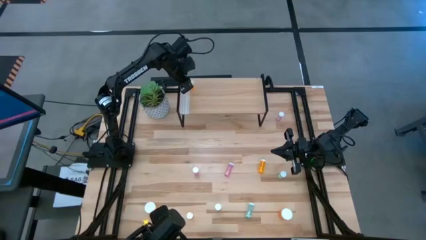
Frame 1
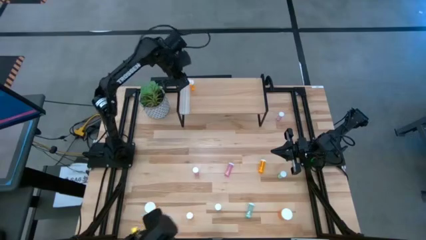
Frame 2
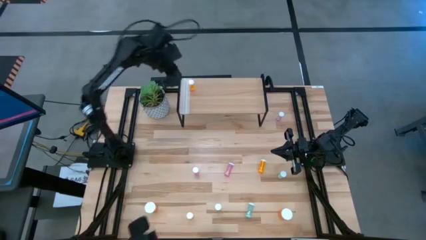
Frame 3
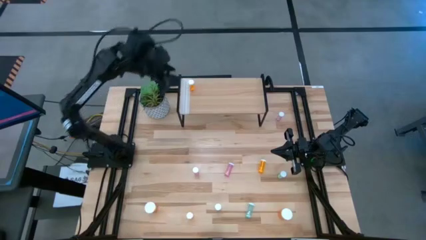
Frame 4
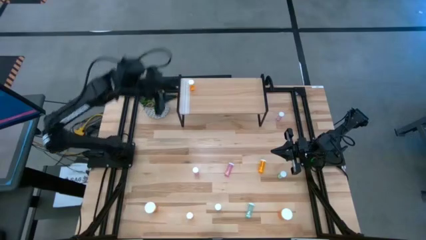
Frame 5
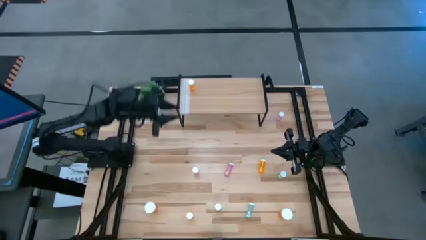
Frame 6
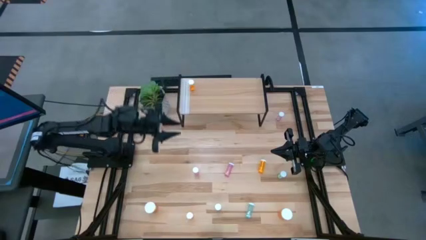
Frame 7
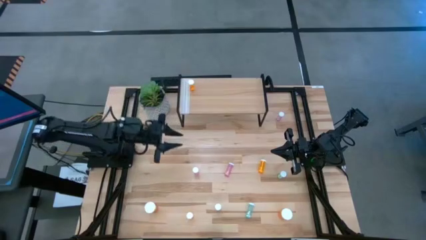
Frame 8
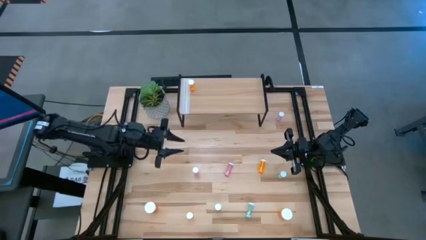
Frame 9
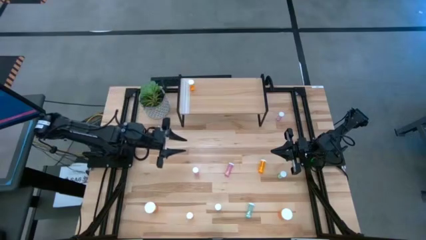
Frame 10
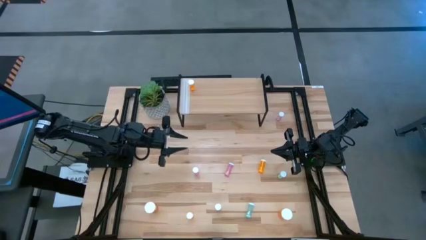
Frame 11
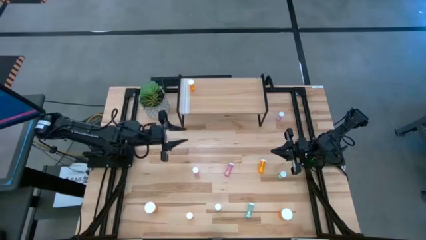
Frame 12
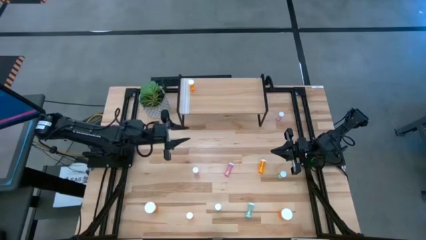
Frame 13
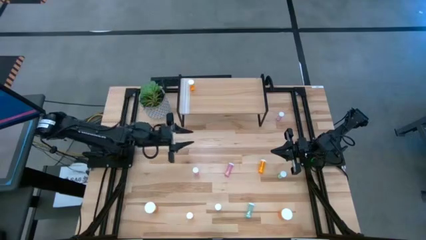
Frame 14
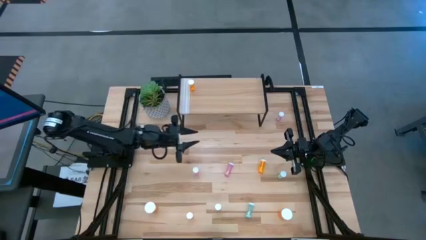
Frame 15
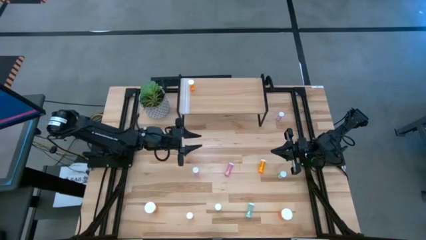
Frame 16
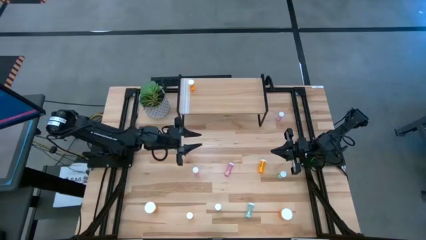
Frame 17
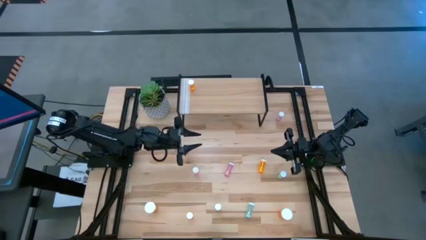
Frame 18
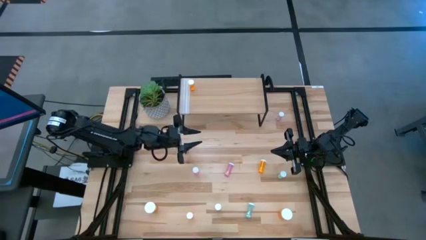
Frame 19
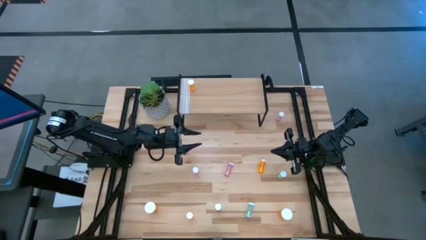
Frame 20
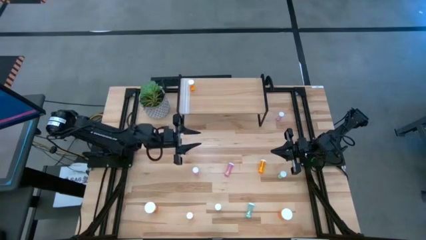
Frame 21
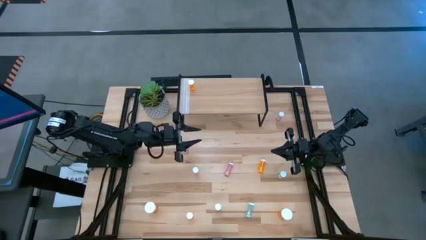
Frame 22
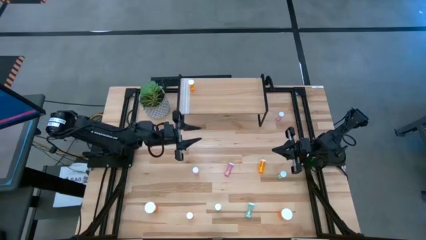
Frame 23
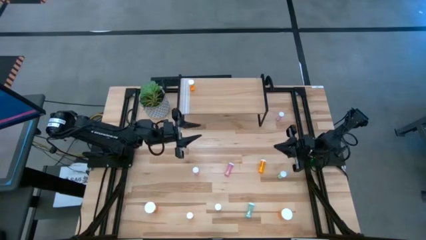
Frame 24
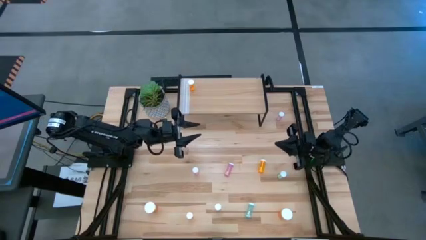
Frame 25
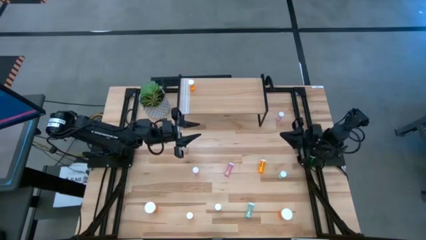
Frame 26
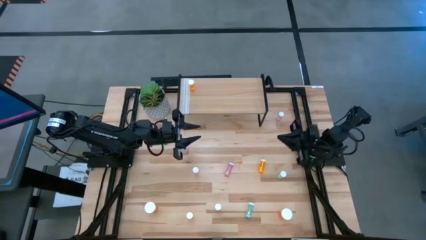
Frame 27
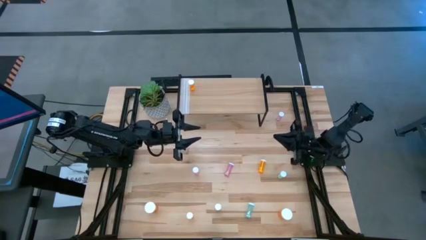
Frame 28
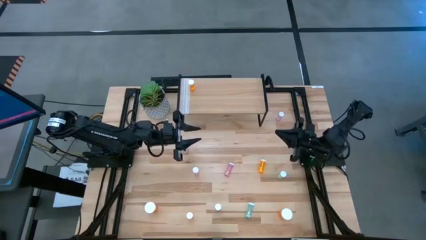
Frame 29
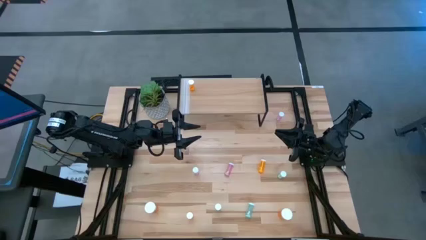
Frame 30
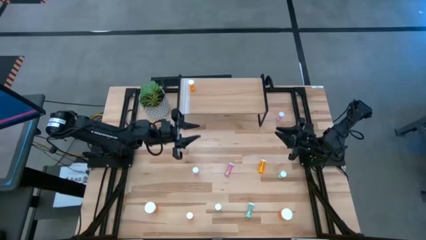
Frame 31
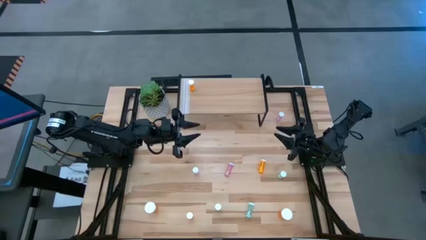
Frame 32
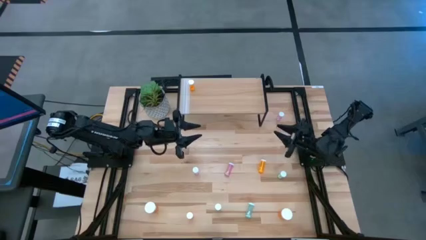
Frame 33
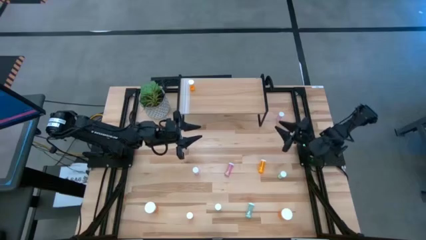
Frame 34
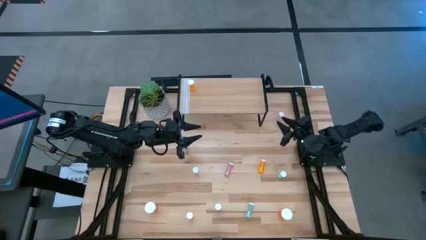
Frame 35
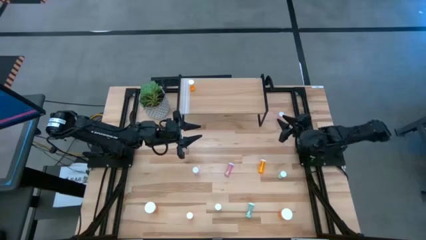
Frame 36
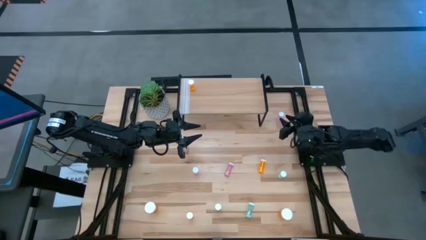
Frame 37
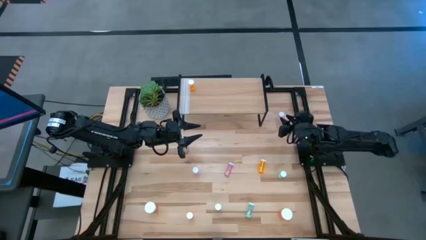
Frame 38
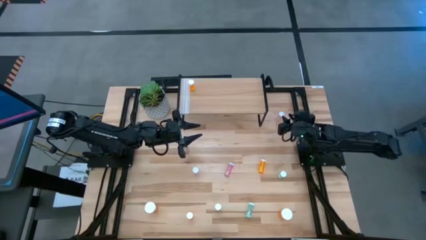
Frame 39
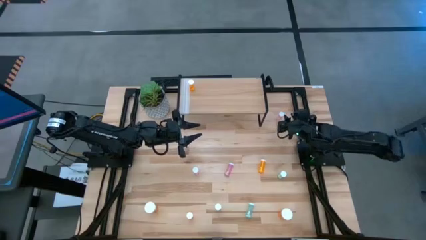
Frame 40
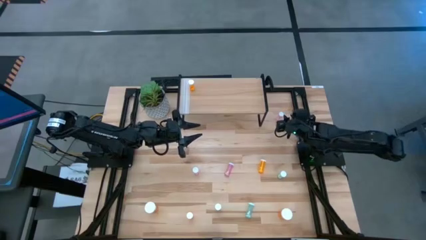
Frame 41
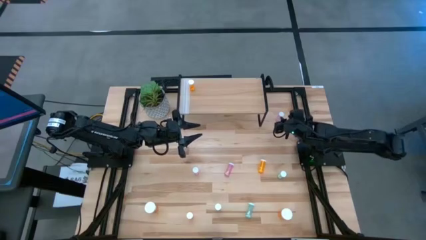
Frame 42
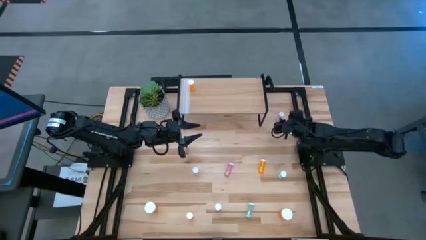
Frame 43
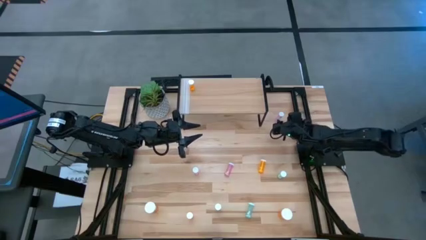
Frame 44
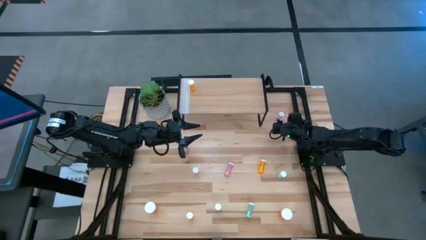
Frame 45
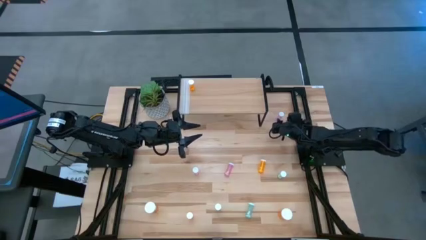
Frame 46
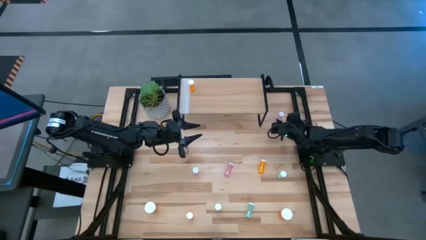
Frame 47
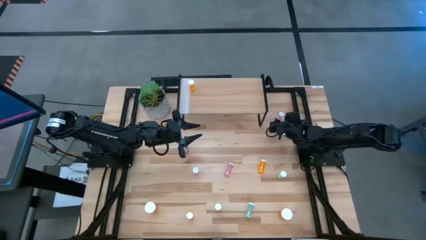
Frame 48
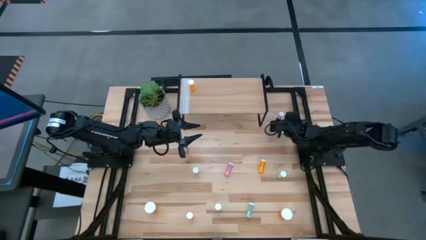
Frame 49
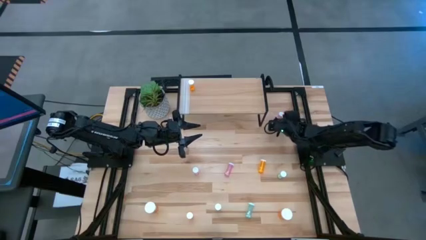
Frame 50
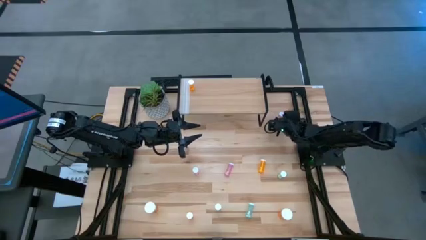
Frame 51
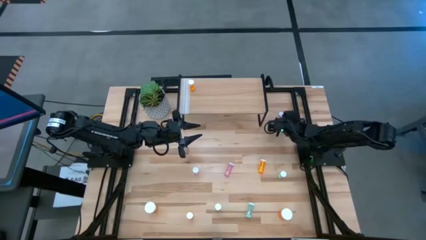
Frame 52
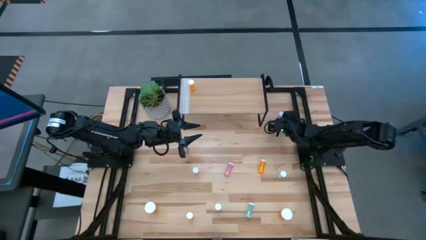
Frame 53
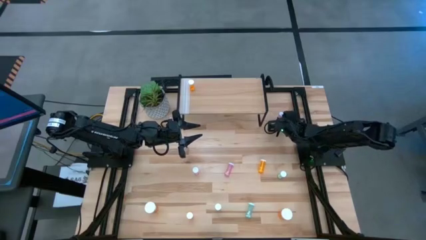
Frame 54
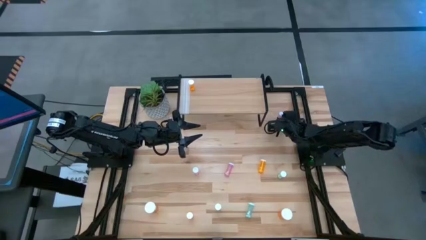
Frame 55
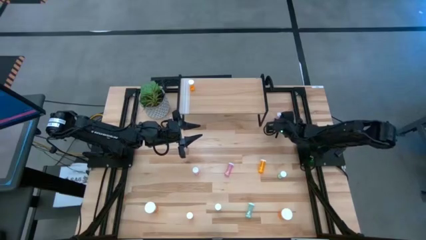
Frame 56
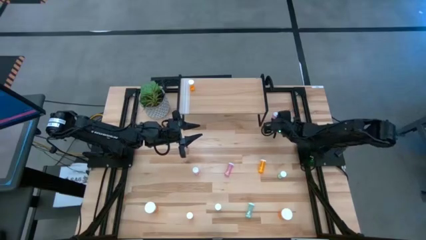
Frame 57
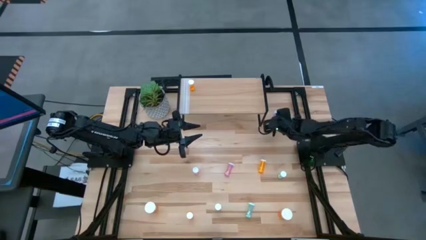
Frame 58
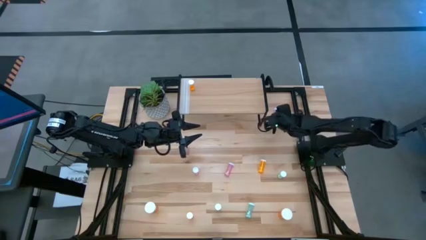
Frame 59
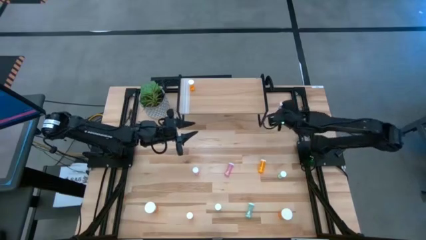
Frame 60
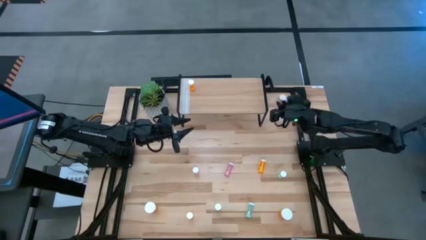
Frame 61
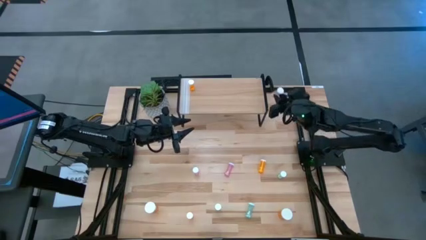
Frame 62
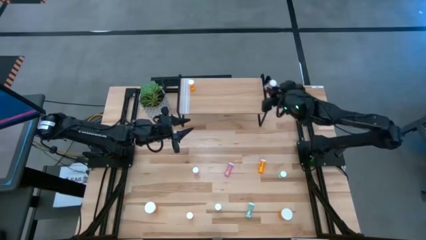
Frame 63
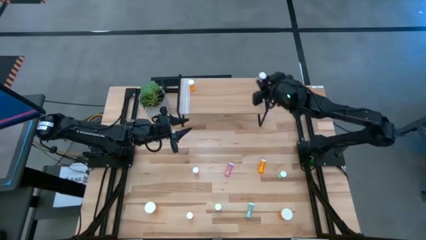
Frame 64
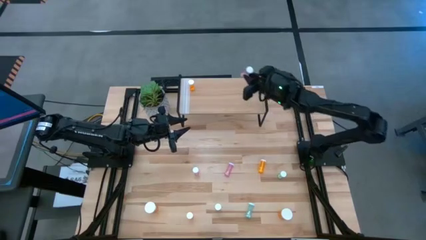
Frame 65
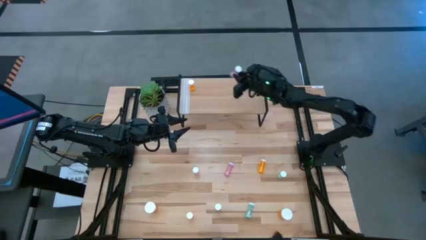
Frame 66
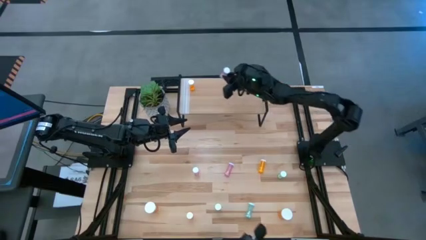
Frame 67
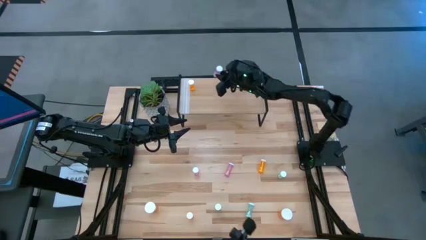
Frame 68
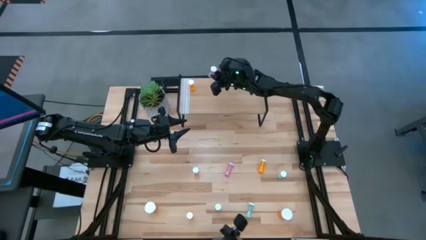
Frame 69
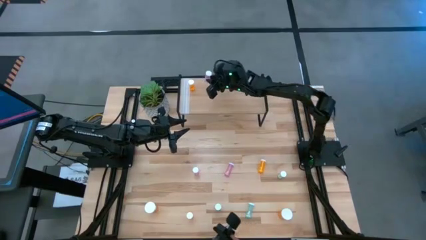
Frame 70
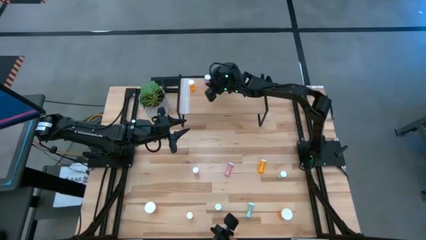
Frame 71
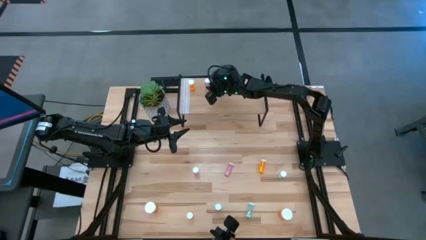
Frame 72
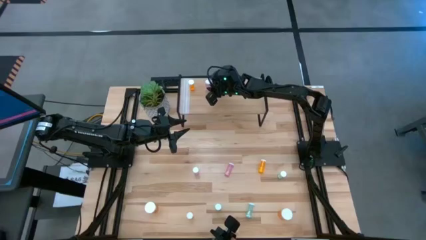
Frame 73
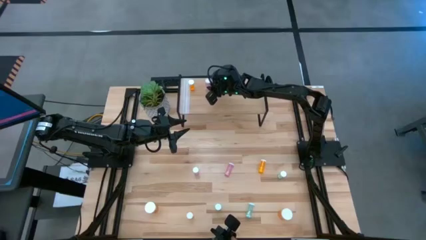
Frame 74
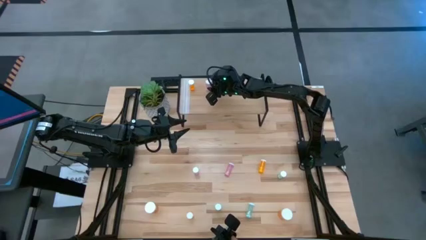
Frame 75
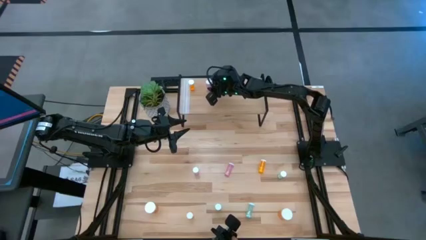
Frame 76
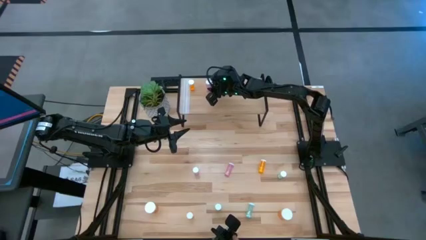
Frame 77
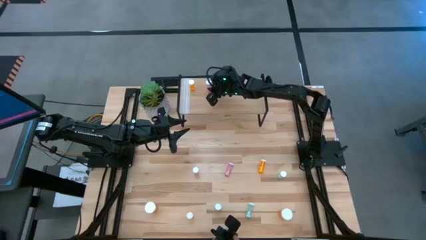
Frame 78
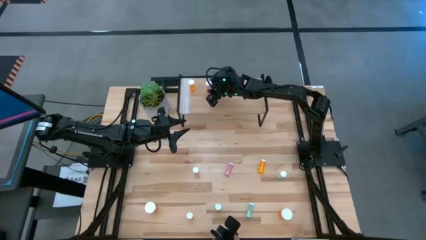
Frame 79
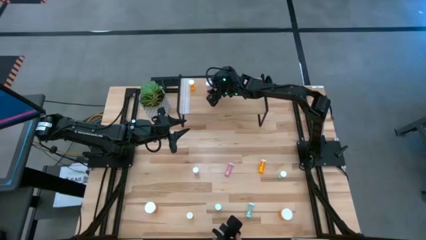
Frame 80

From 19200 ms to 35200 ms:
Task: Pick and place medicine bottles onto shelf by color
Put the top pink pill bottle on the shelf
